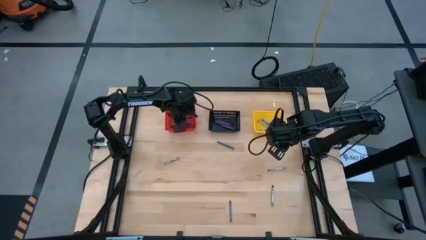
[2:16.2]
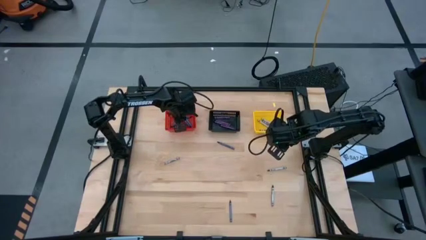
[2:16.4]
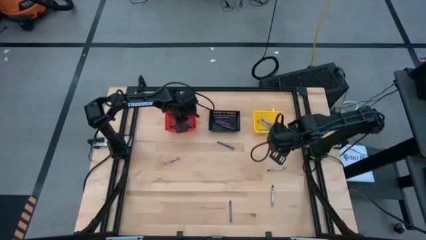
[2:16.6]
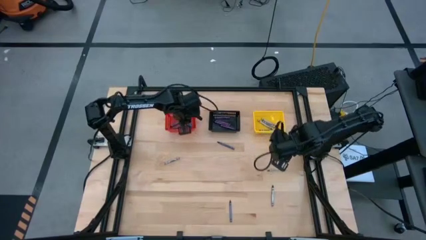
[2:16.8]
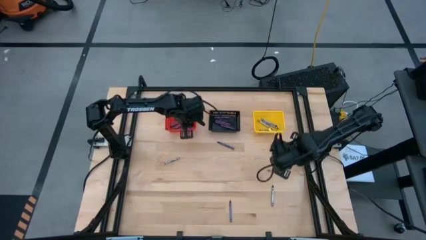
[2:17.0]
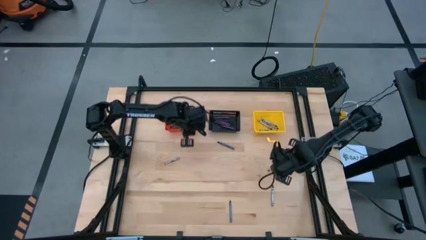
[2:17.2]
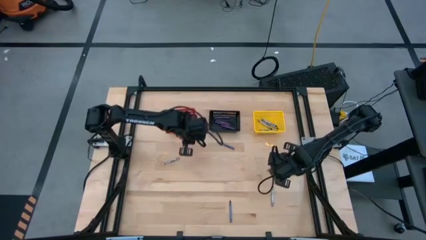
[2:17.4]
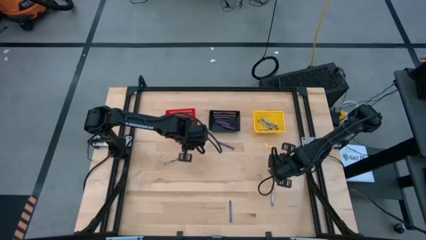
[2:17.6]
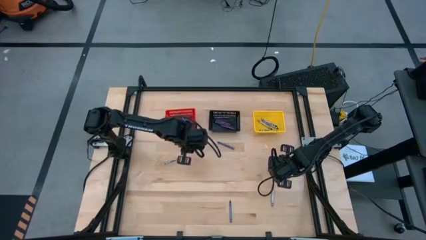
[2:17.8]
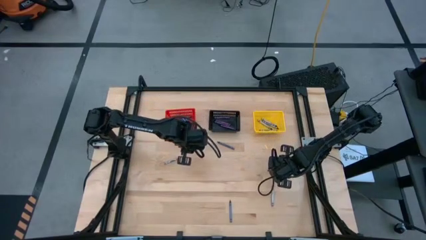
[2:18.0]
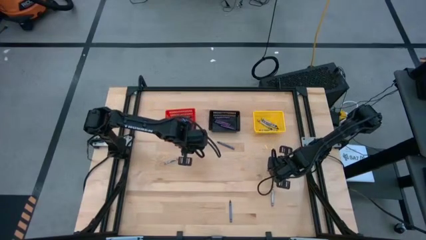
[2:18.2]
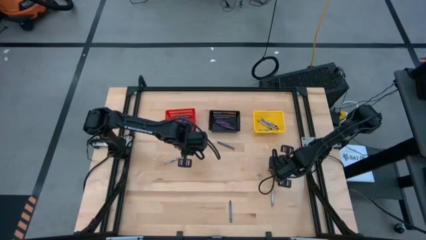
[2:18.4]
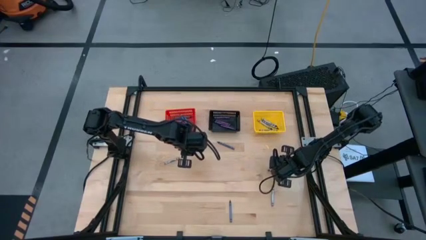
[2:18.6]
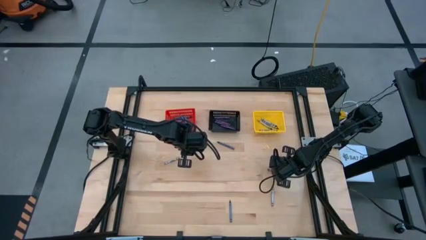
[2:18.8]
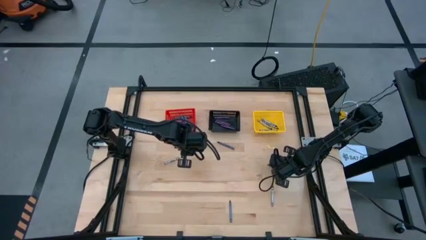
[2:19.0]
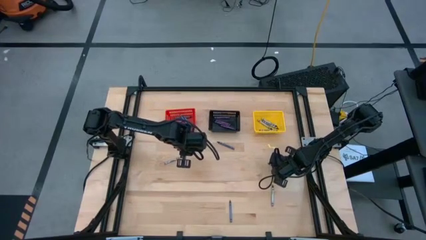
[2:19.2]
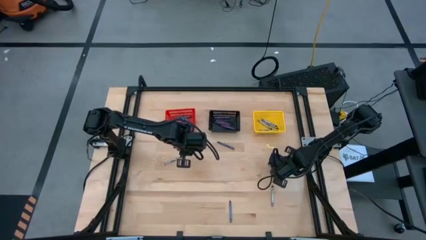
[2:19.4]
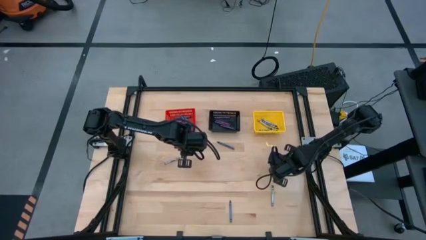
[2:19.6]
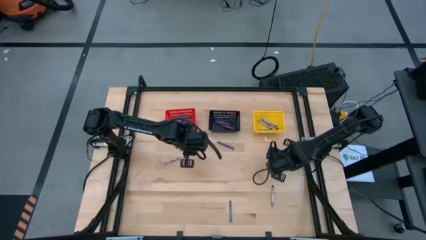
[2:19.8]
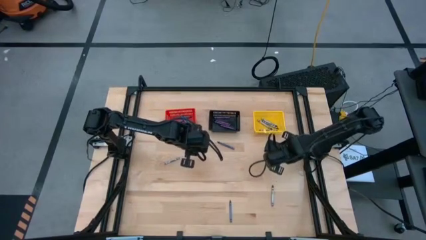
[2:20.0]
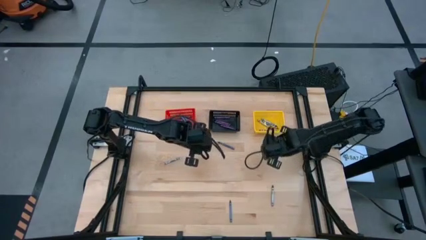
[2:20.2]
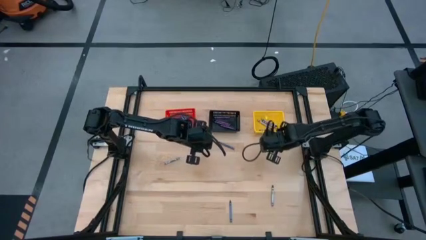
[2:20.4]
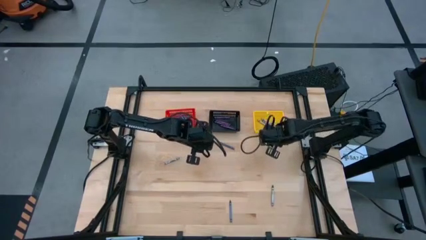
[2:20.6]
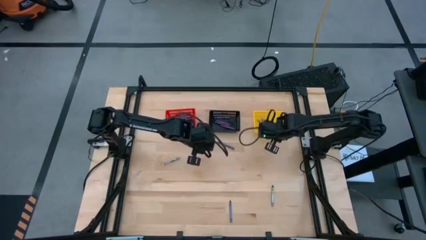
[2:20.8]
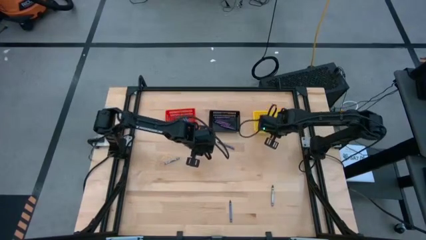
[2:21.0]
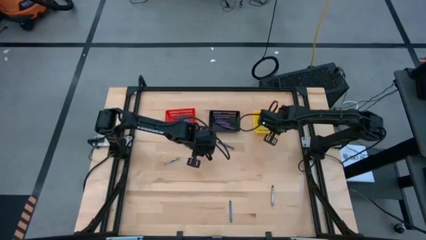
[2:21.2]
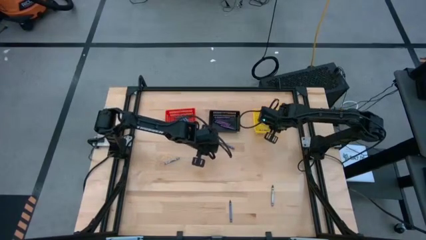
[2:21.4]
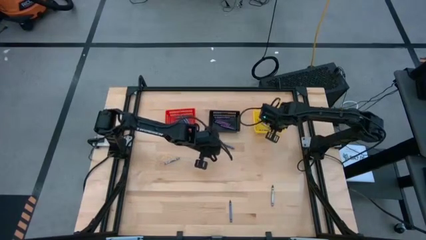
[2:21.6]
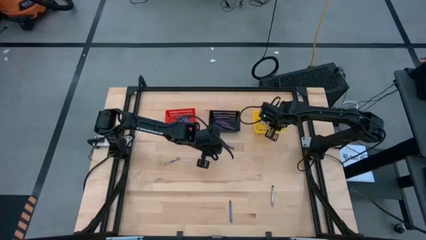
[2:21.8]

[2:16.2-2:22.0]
Task: Sort crayons
Put the black crayon into the yellow bin

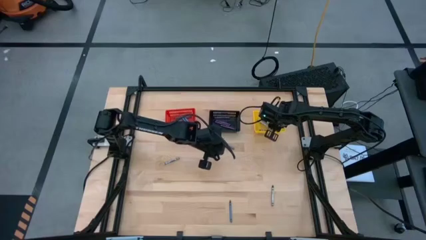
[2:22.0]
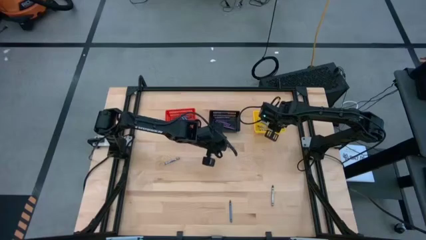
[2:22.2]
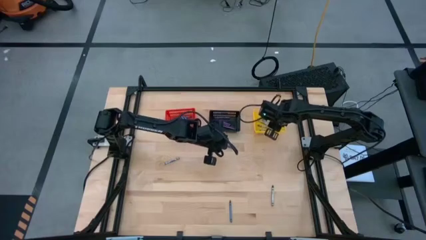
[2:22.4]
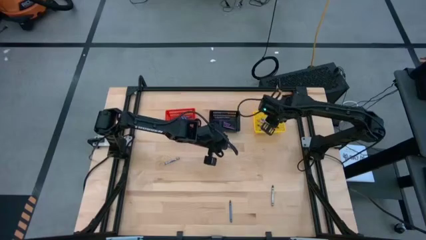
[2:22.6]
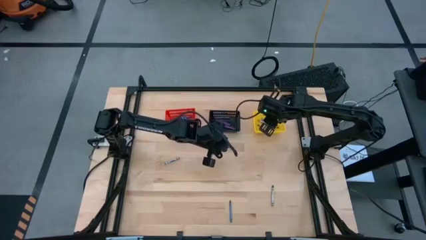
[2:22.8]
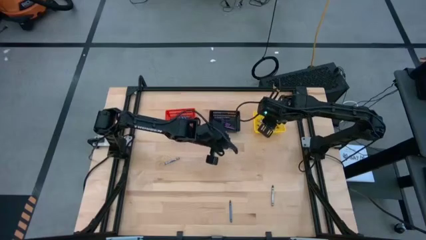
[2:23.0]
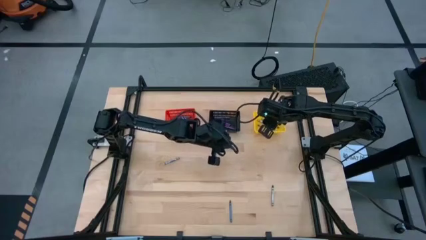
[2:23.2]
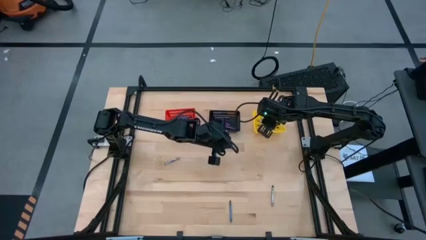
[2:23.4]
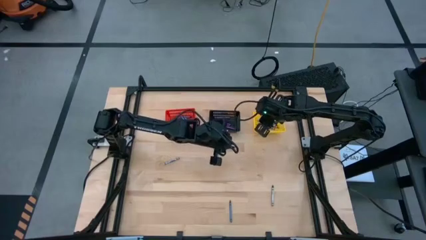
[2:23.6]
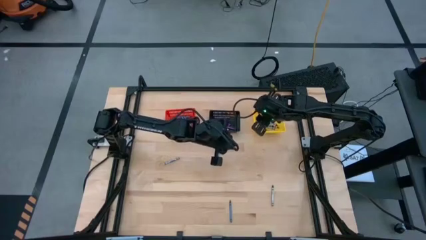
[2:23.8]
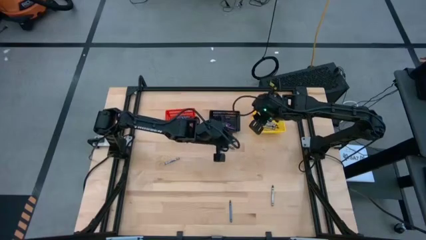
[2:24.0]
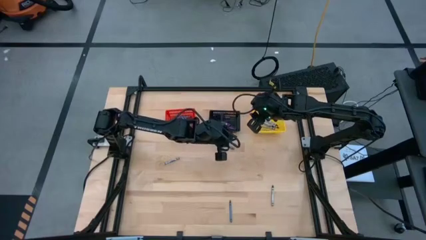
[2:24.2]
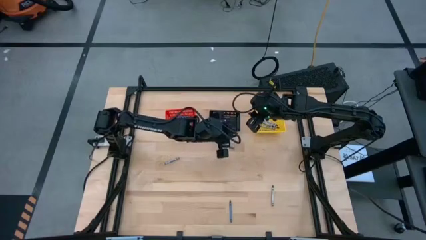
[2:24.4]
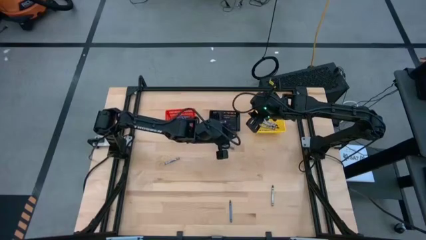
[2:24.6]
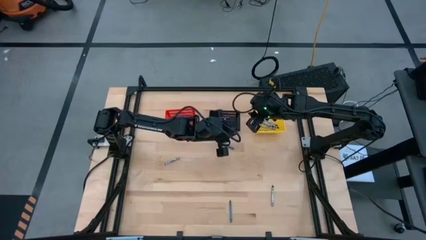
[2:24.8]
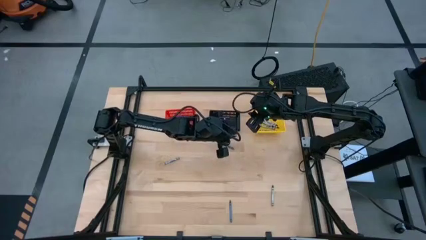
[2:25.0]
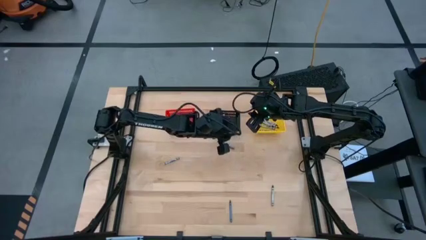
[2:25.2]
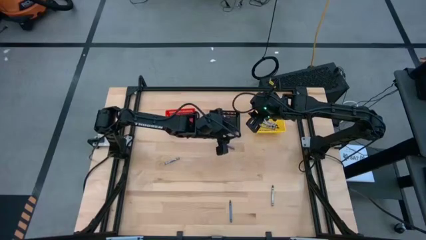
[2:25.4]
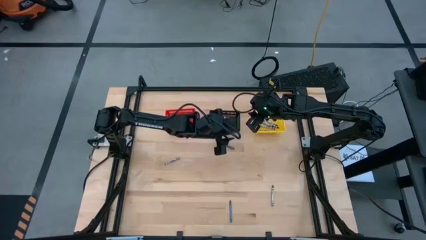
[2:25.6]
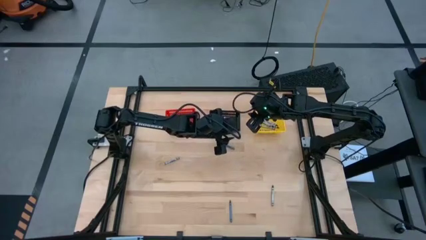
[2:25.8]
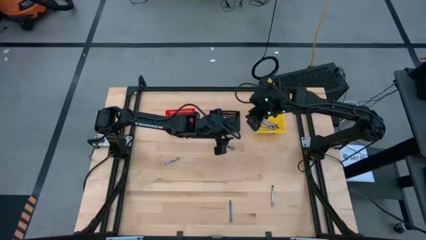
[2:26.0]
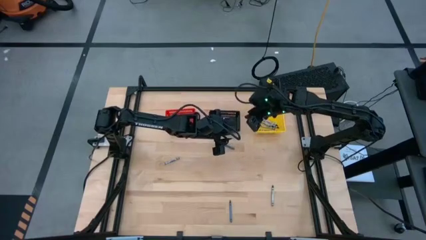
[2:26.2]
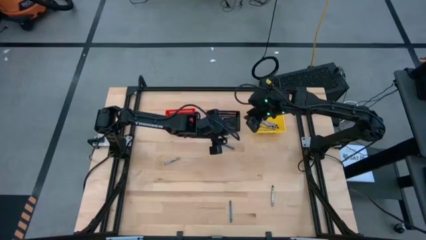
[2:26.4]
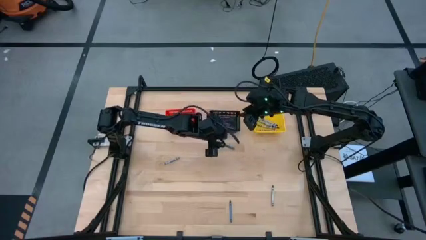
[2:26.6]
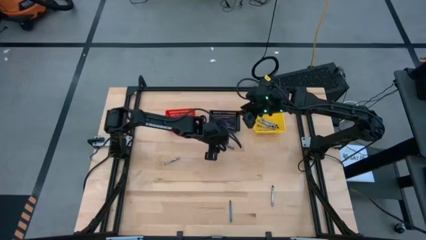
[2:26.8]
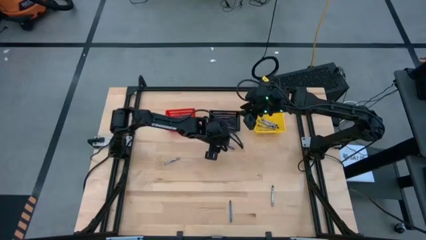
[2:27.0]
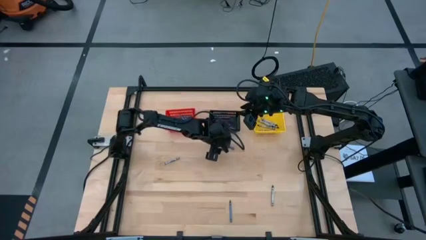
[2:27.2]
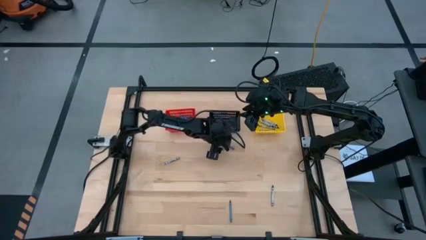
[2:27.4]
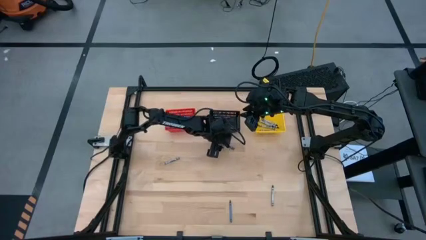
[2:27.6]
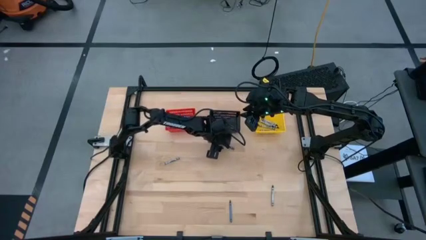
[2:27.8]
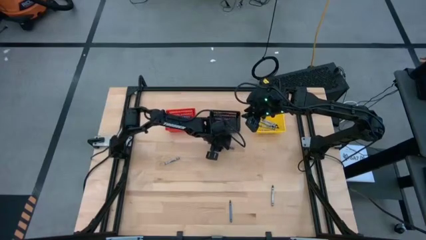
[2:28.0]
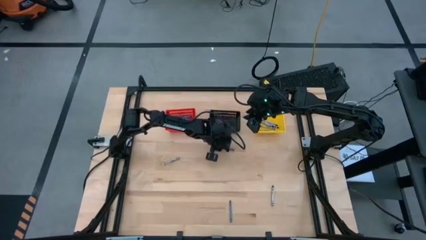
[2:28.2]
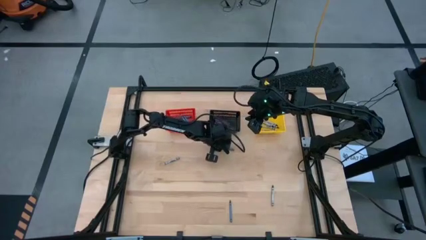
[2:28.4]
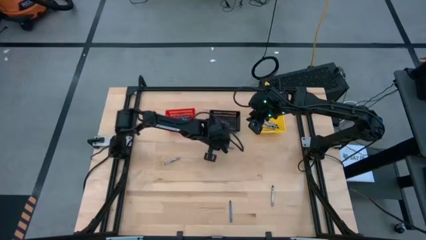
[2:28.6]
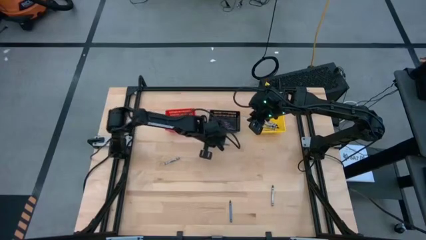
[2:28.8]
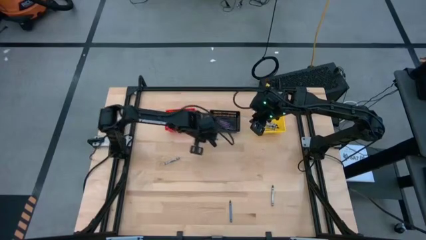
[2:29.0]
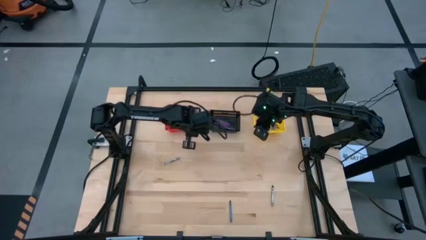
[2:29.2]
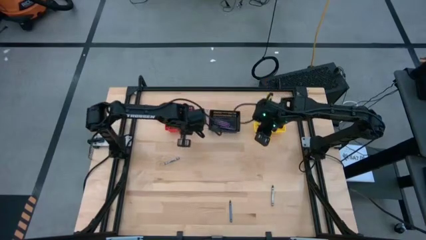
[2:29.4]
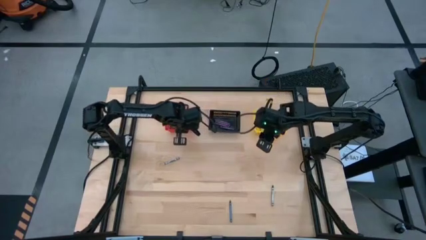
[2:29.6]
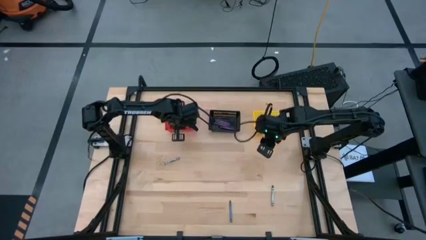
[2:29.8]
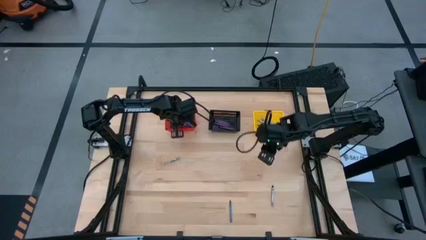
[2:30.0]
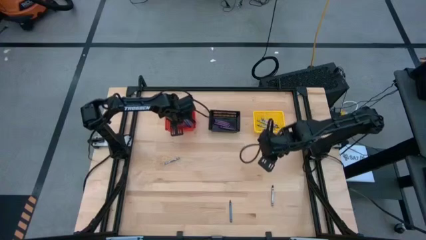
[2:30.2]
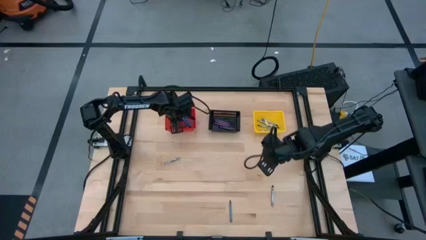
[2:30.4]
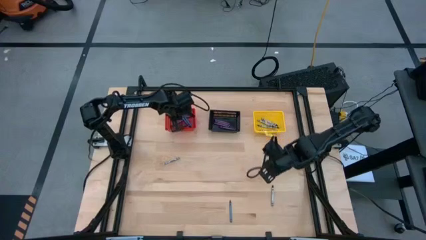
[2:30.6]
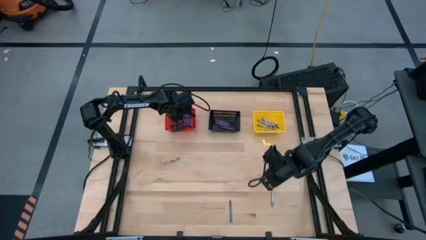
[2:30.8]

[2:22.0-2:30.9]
Put the blue crayon into the red bin

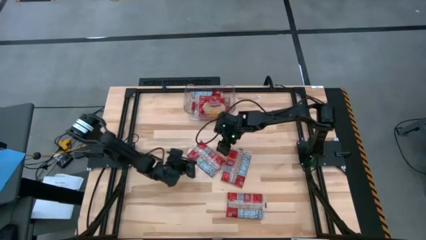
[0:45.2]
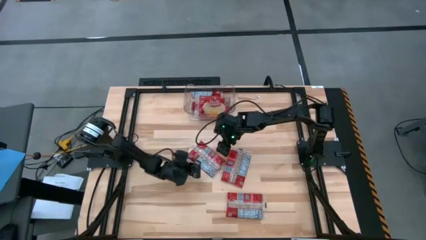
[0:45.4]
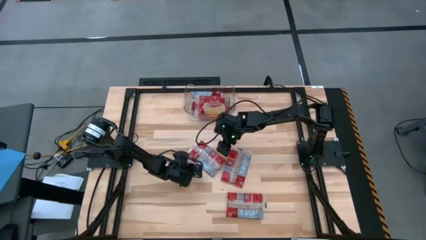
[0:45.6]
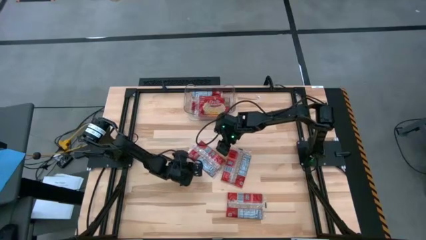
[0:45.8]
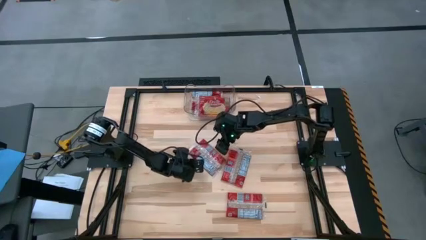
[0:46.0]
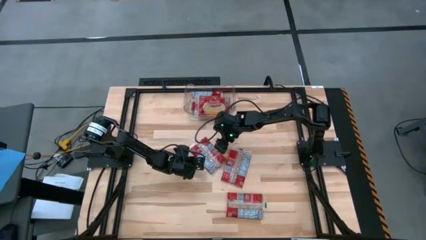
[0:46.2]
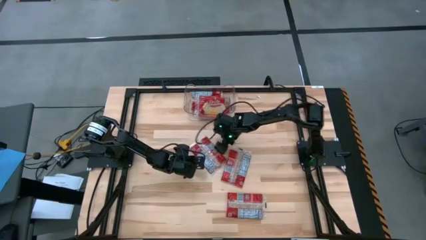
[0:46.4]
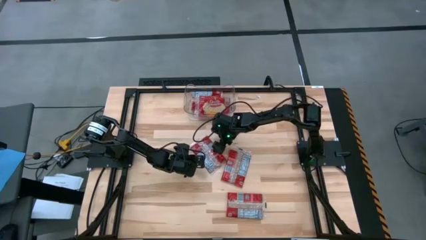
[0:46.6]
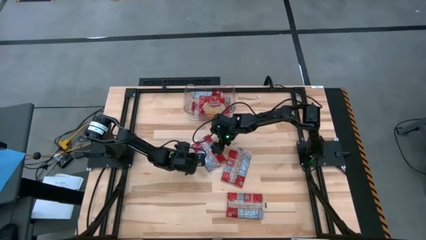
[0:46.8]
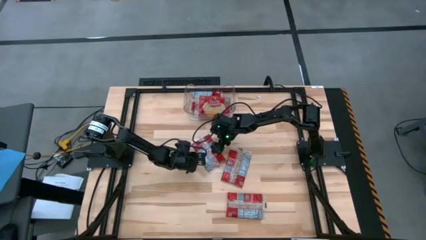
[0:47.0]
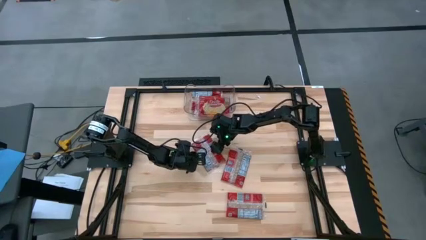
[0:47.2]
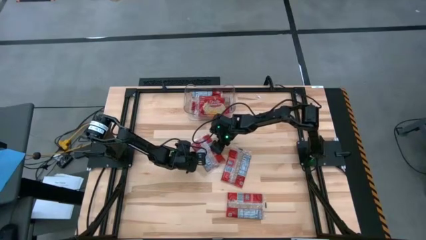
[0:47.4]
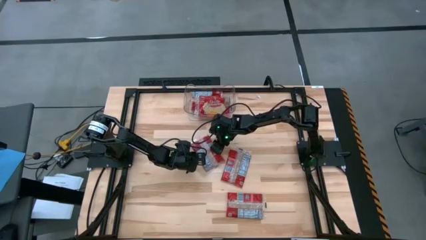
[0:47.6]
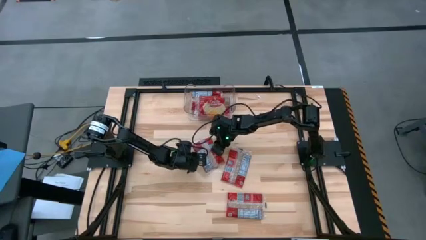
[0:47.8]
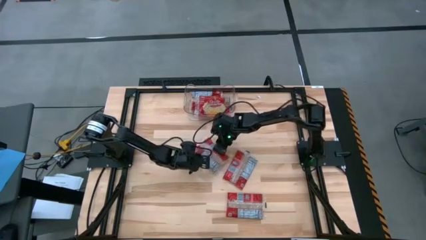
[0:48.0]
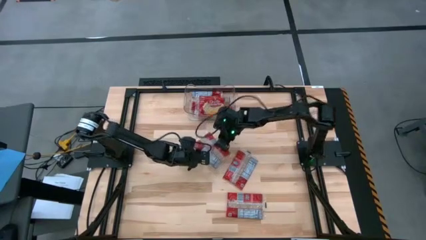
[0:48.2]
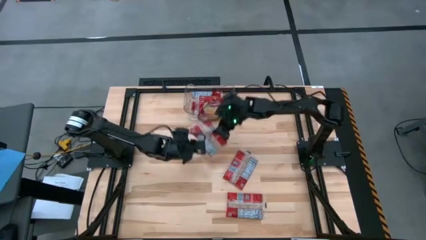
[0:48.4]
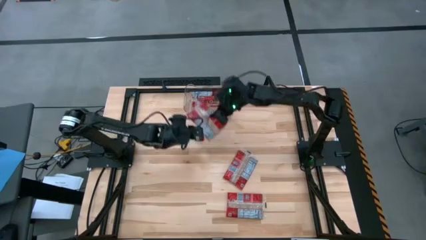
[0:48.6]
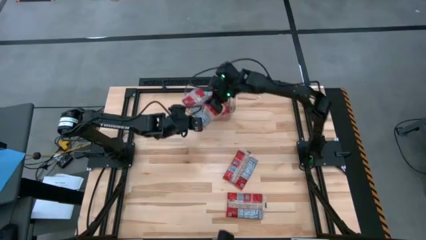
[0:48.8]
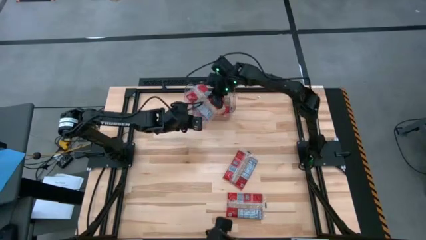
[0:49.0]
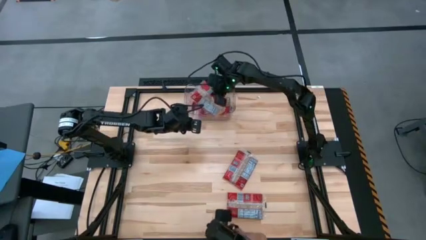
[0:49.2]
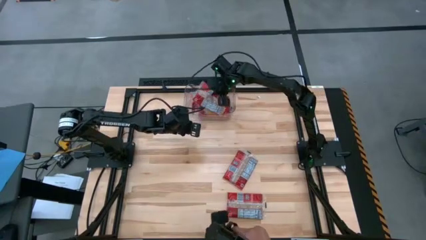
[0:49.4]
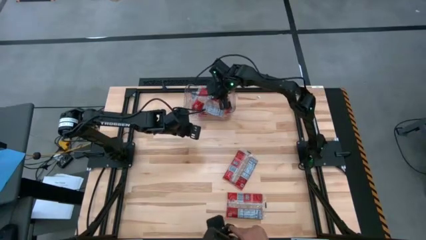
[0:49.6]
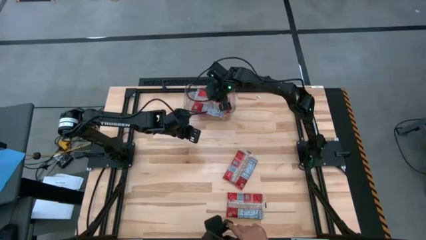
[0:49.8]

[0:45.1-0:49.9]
Task: Sort popcorn bags into baskets
Put the red popcorn pack into the transparent bin
